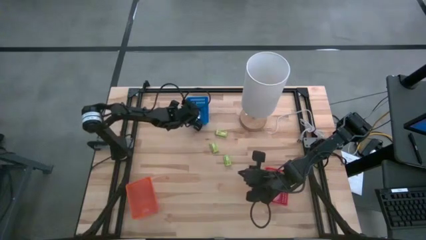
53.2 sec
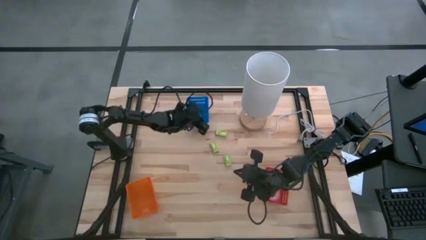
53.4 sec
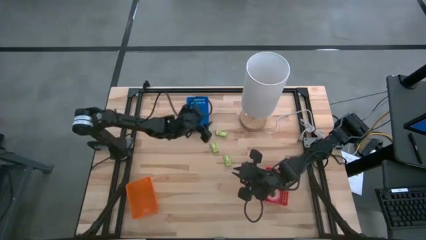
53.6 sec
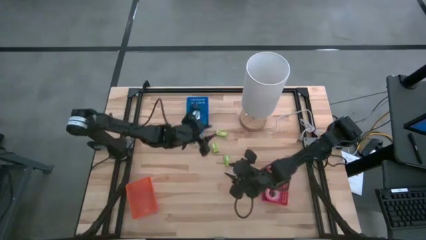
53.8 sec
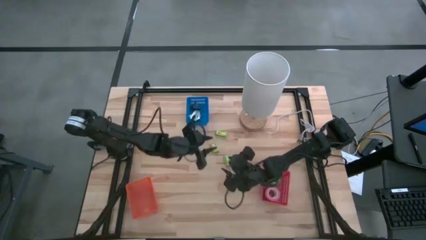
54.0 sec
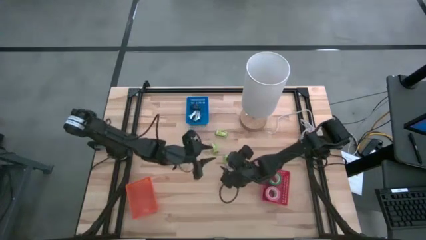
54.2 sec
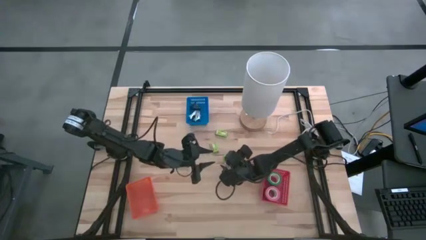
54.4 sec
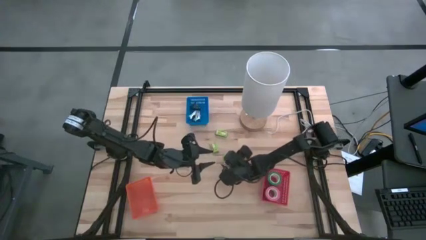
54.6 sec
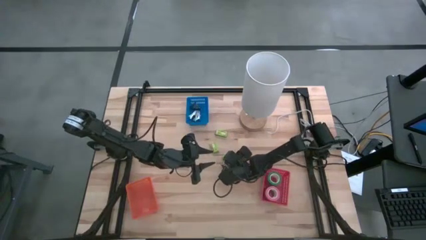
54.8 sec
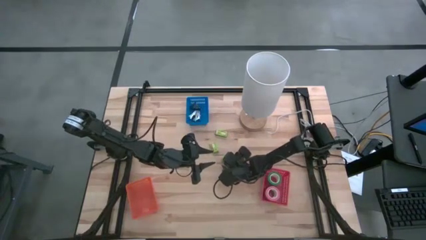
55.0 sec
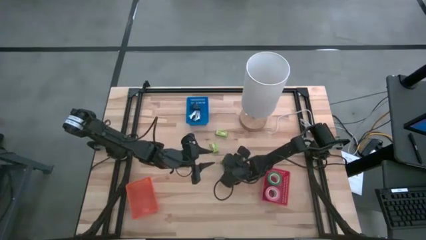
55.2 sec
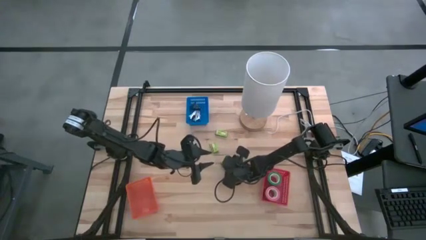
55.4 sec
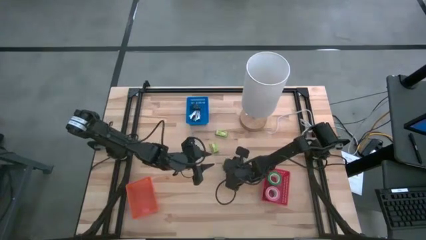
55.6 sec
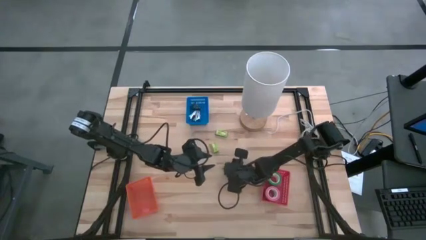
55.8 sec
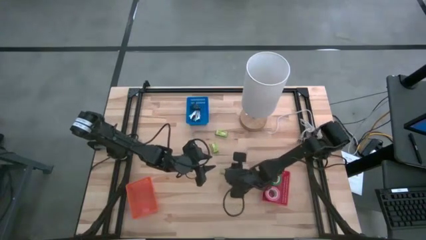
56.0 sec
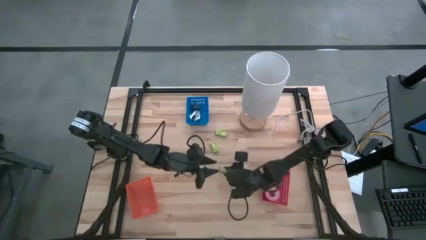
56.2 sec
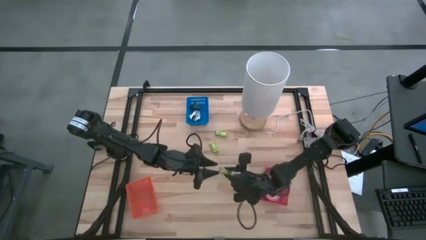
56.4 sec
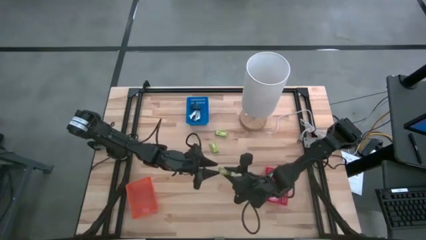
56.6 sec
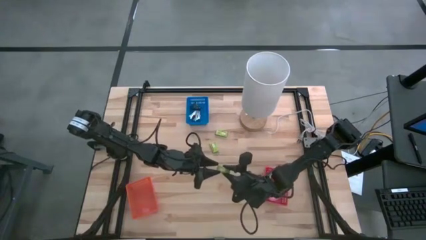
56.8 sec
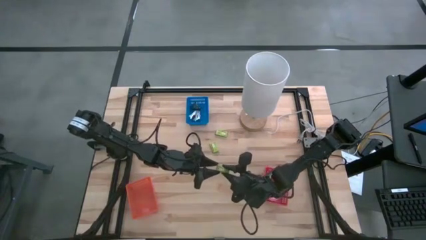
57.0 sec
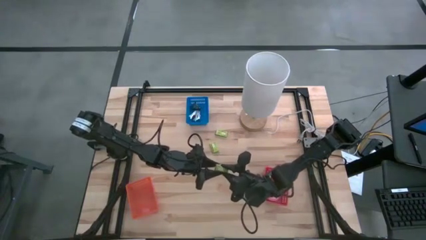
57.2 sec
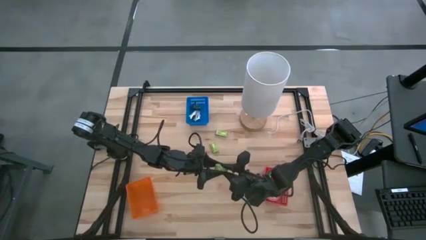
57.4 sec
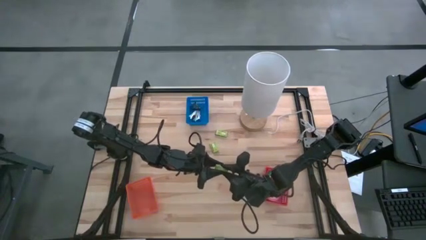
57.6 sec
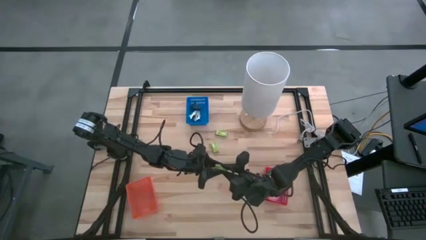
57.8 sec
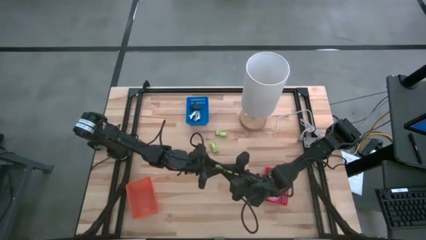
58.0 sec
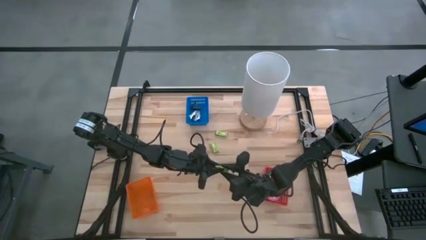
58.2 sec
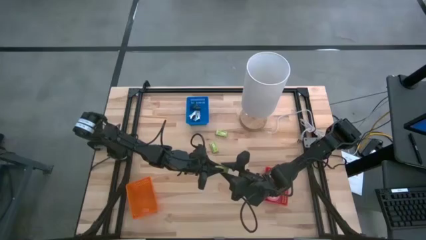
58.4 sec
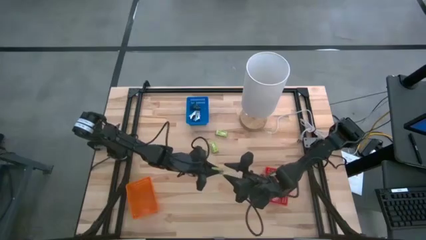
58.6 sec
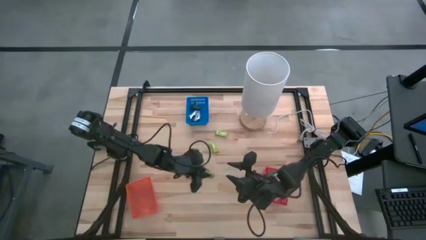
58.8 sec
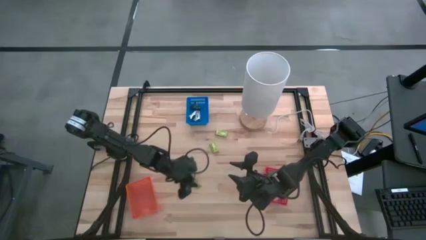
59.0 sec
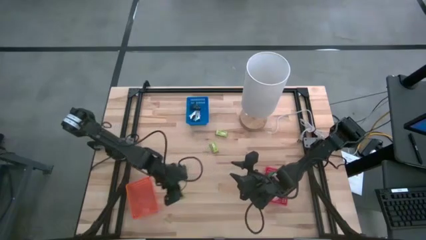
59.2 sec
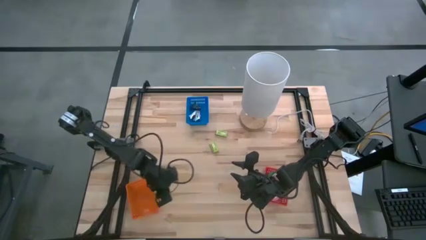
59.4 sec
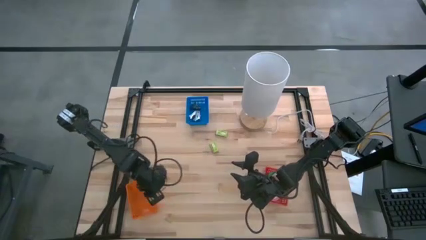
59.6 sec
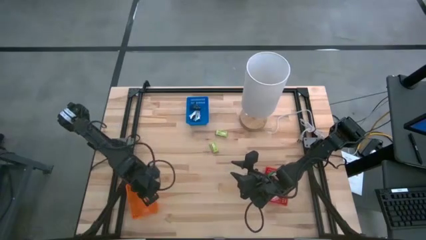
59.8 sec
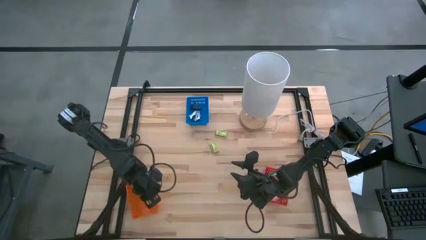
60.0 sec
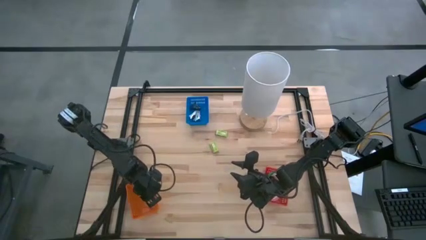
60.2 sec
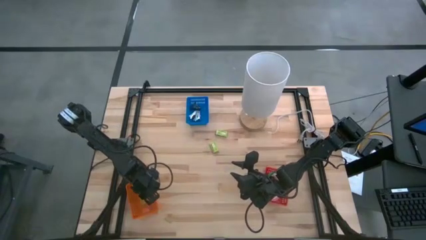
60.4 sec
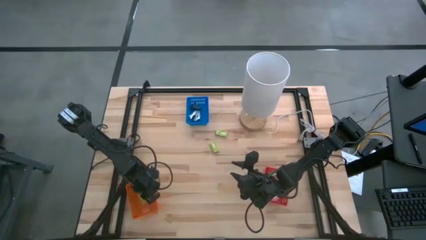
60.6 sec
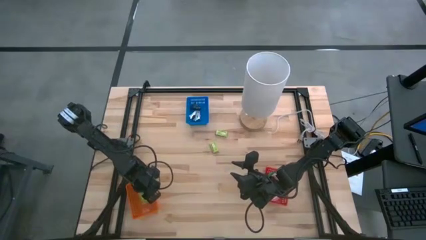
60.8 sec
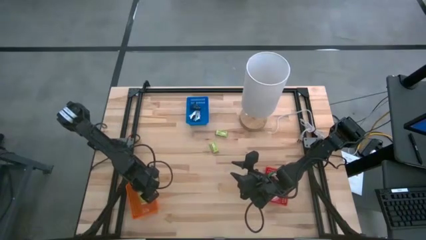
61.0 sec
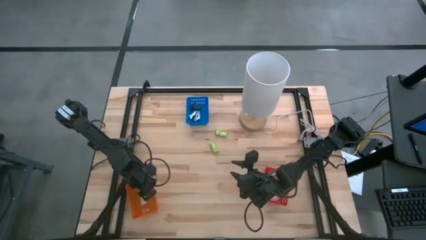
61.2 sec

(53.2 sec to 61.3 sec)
Task: Pick and place Stapler, Stapler remover, tape
Put the bottom green staple box into the orange bin

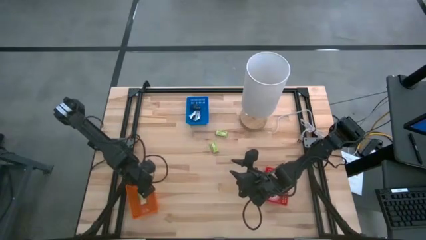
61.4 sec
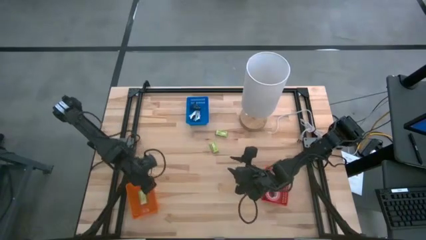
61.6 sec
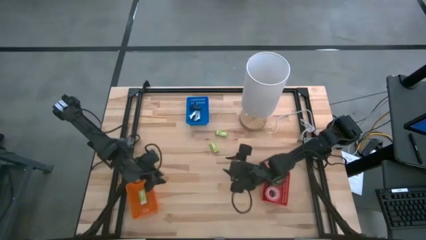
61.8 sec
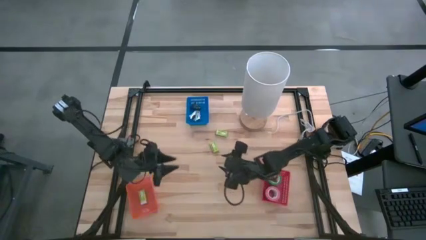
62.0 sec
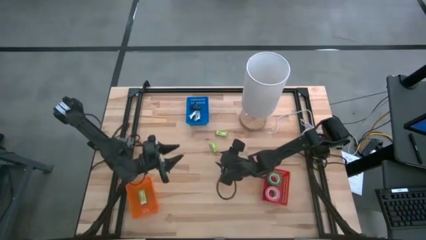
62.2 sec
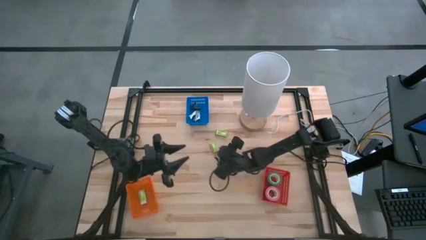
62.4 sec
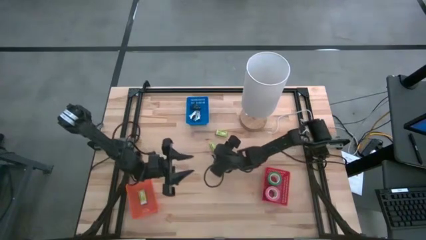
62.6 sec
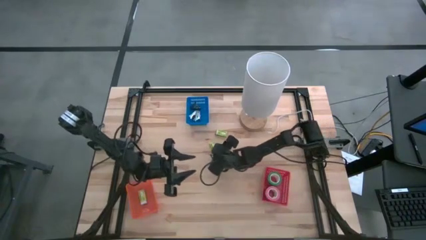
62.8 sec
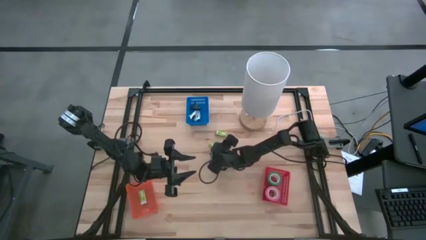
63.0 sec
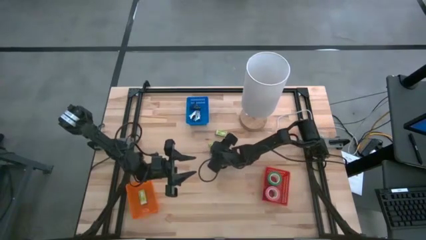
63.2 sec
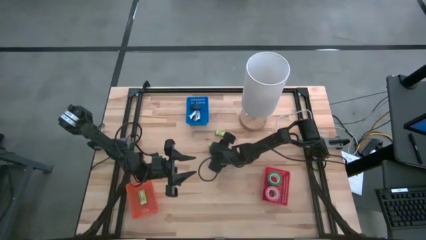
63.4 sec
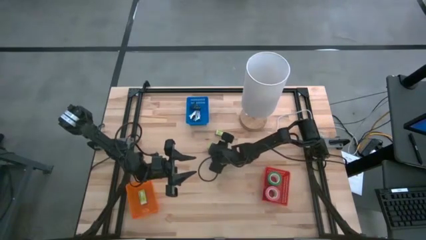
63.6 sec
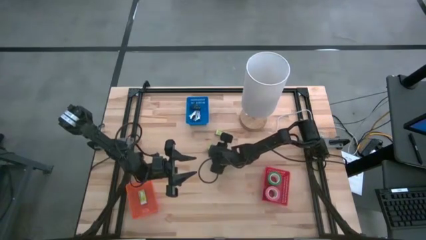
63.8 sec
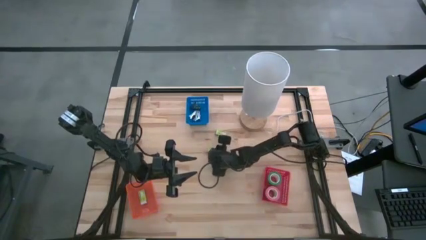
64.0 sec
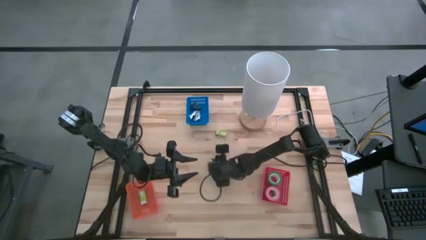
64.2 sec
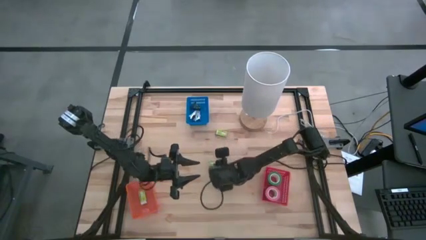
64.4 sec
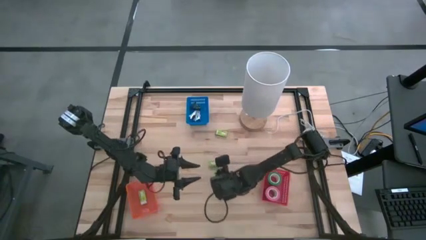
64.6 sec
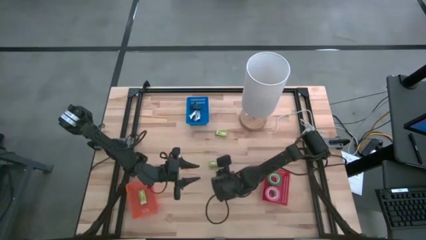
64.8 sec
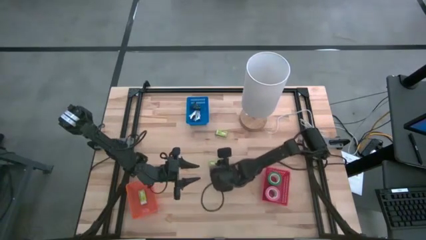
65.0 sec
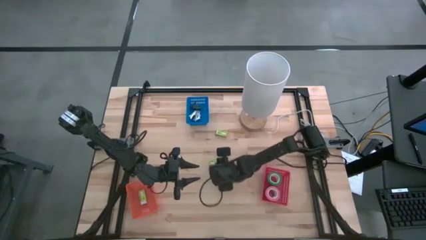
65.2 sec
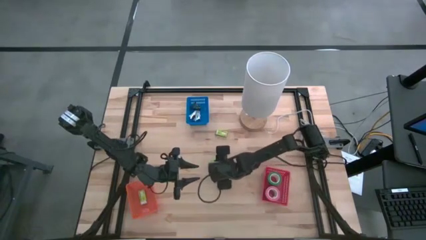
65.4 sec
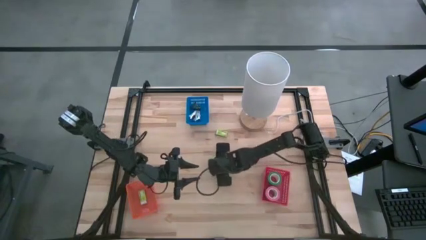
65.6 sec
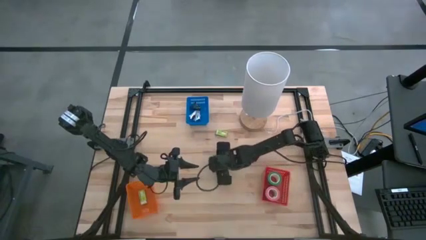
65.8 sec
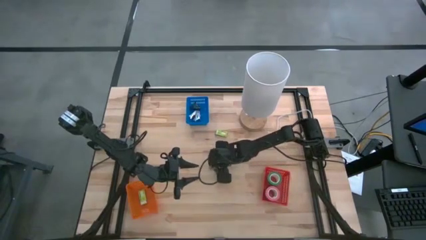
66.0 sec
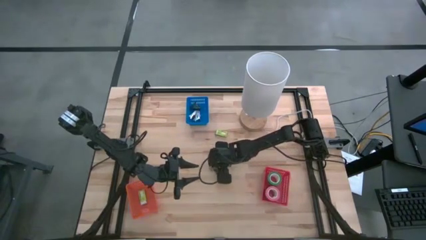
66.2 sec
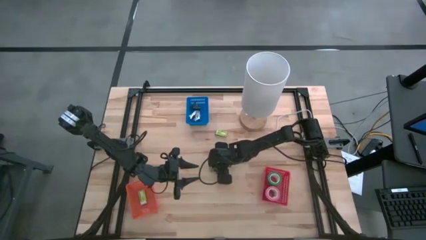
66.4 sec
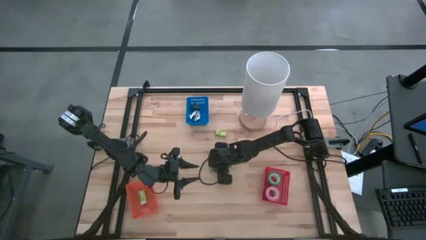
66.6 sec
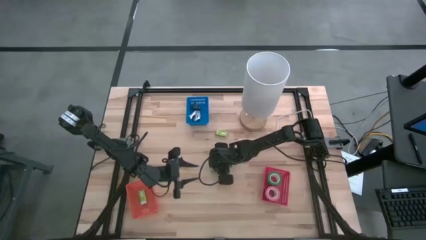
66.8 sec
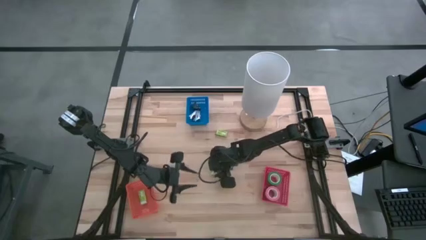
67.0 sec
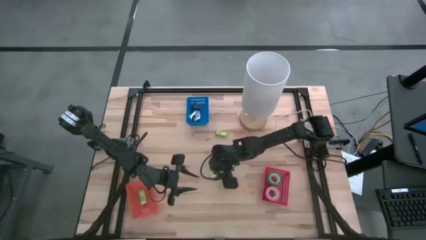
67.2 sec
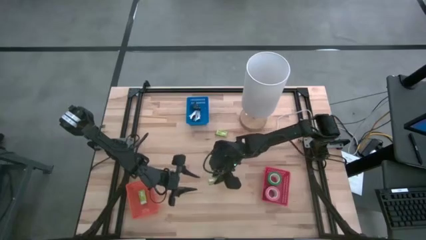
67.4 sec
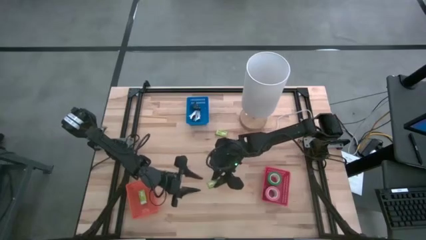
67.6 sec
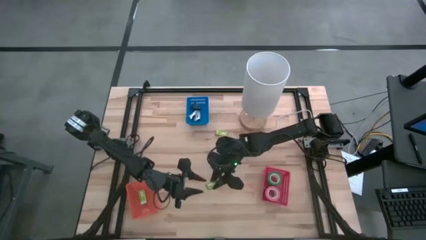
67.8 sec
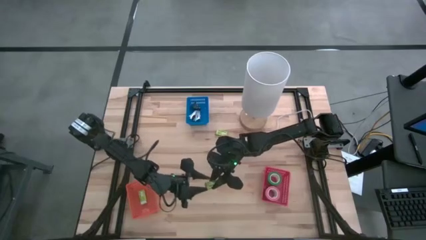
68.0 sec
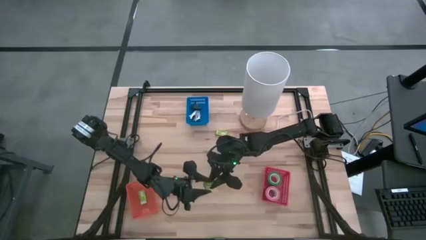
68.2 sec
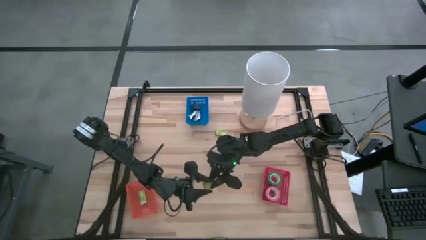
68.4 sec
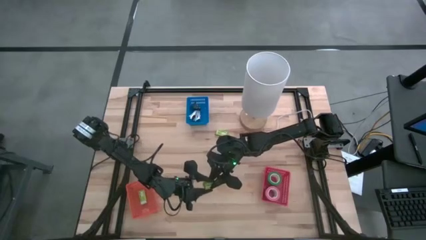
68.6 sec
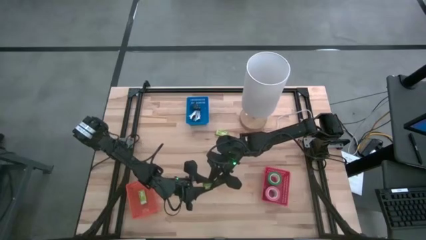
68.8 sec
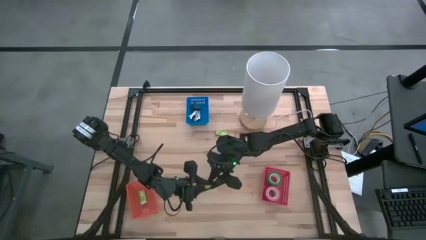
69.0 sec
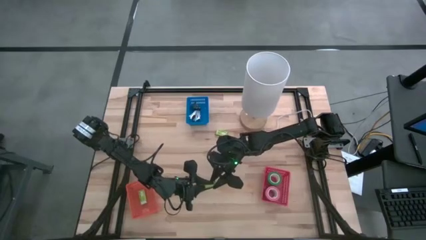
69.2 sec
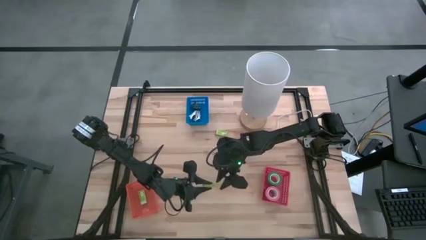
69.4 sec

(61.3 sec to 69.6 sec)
Put the bottom green staple box into the orange bin
